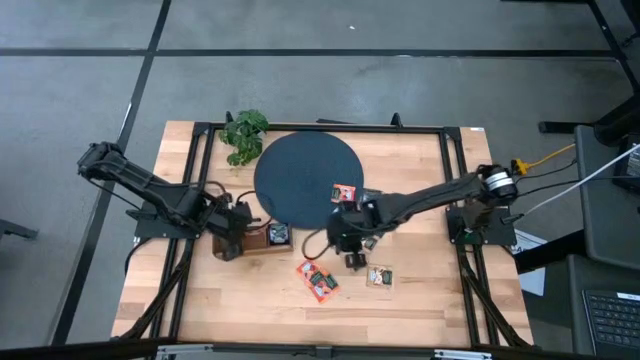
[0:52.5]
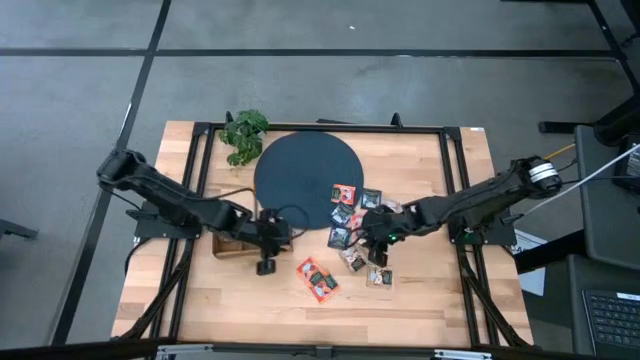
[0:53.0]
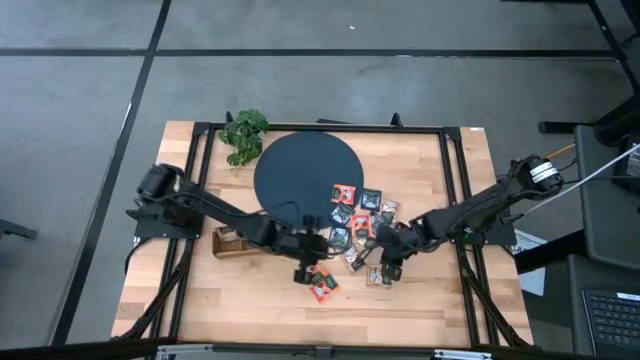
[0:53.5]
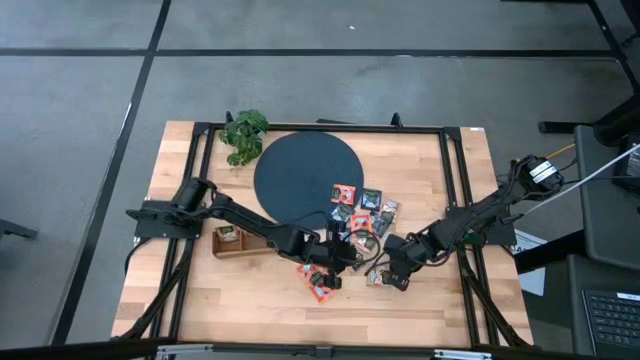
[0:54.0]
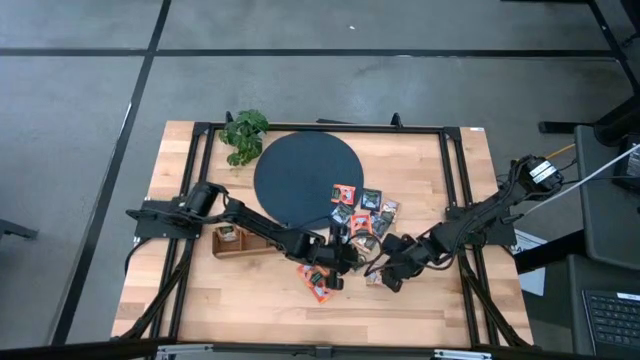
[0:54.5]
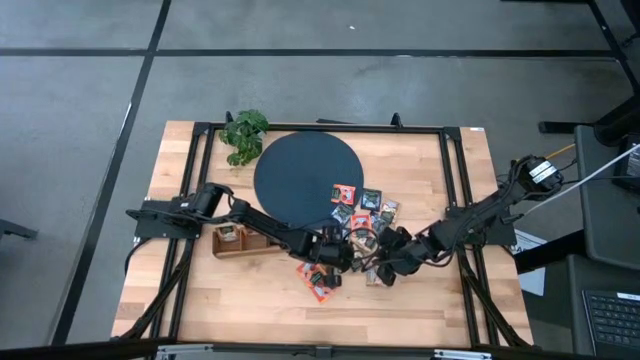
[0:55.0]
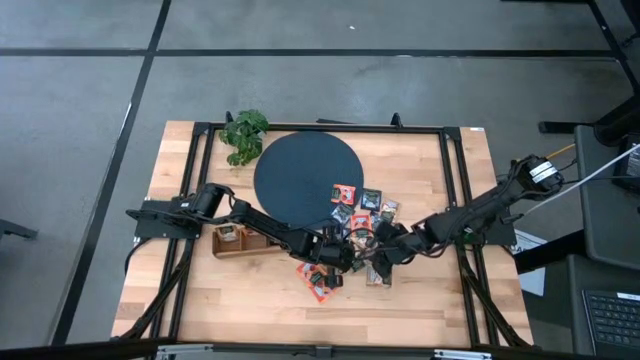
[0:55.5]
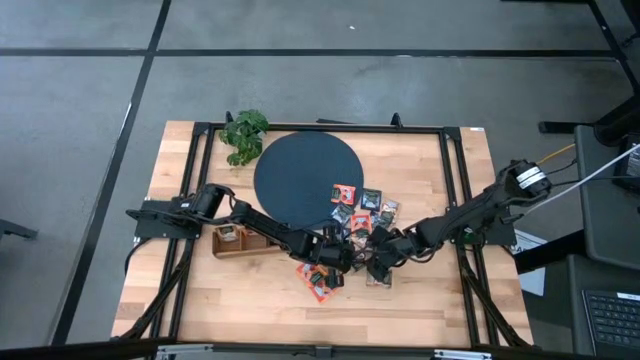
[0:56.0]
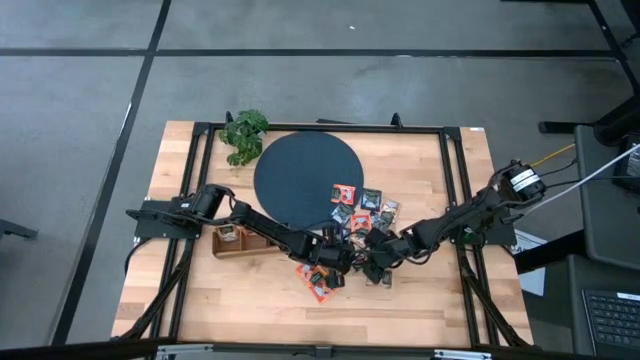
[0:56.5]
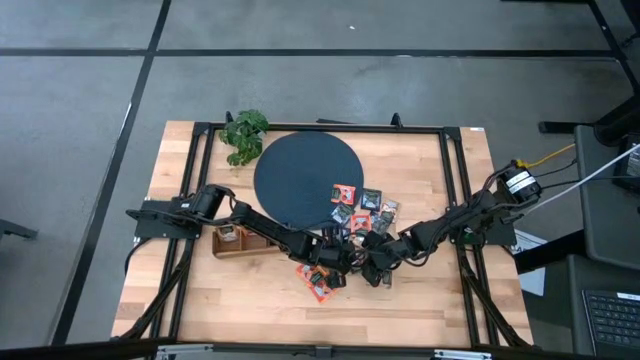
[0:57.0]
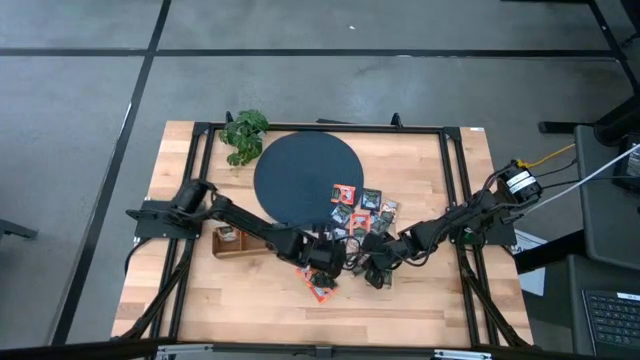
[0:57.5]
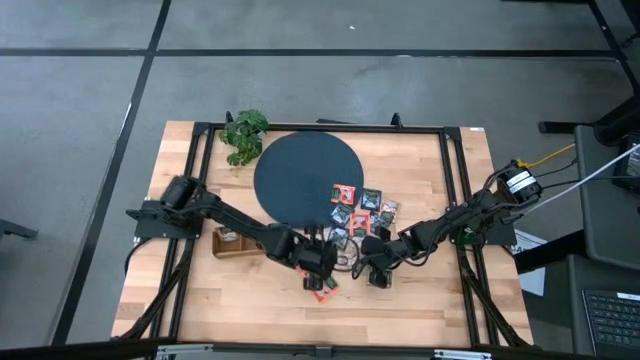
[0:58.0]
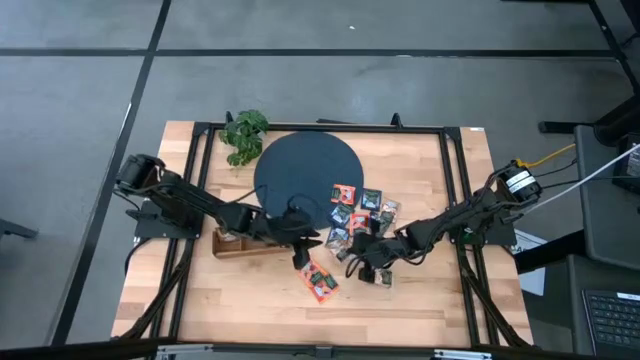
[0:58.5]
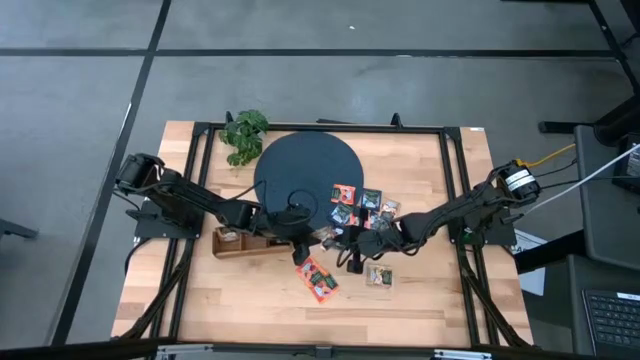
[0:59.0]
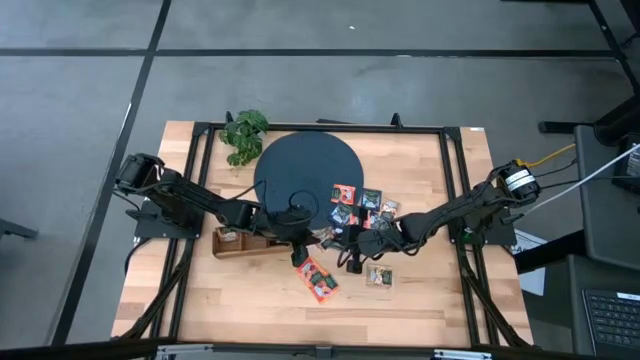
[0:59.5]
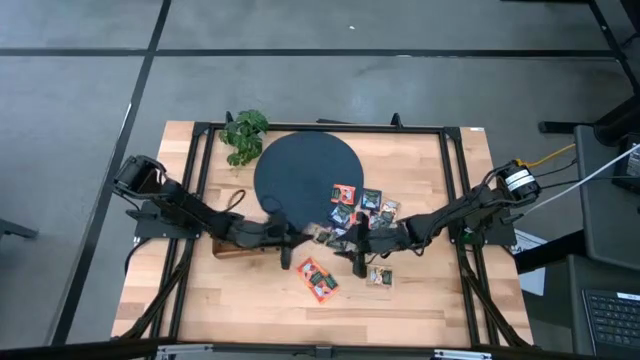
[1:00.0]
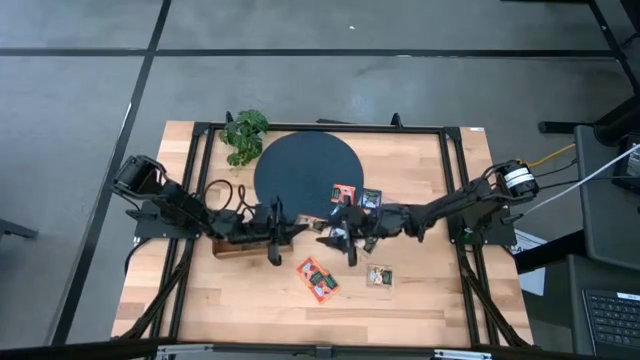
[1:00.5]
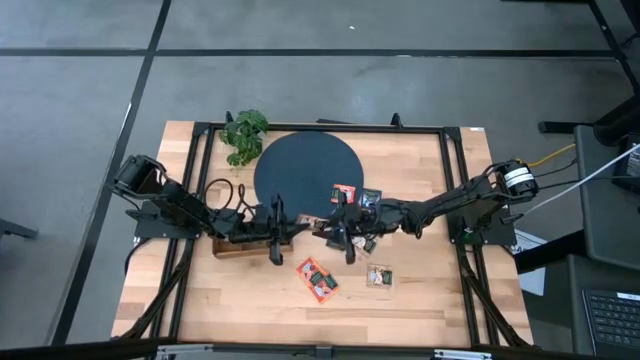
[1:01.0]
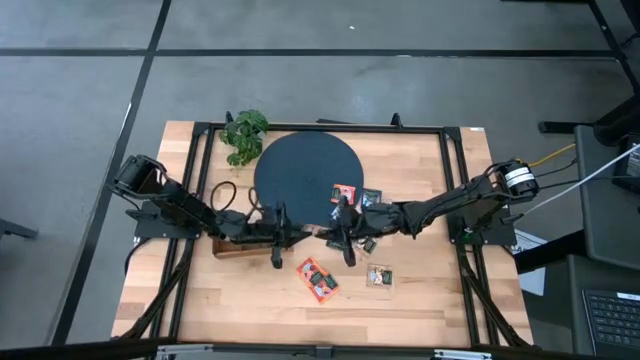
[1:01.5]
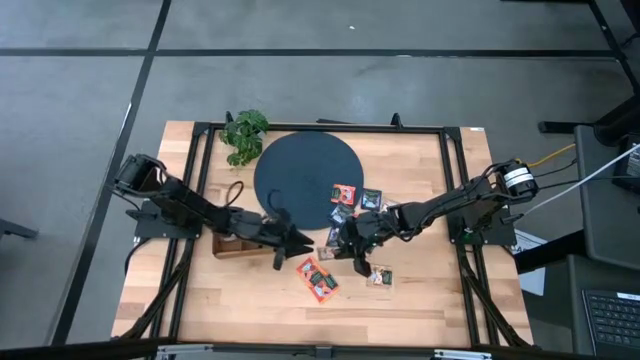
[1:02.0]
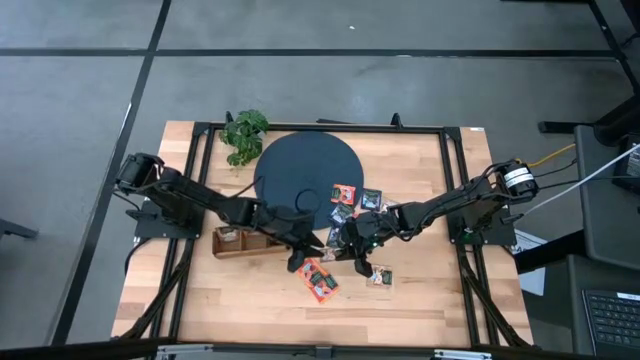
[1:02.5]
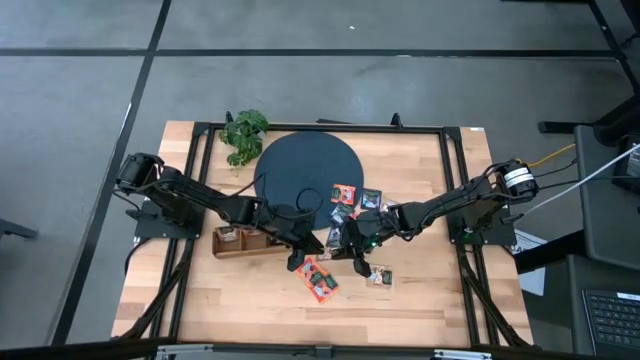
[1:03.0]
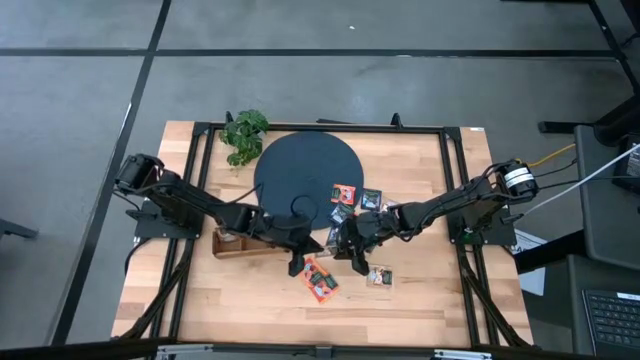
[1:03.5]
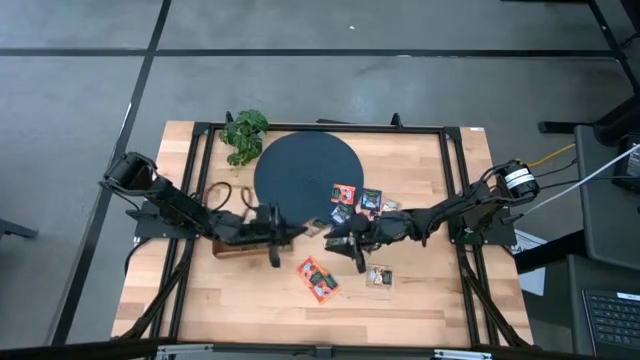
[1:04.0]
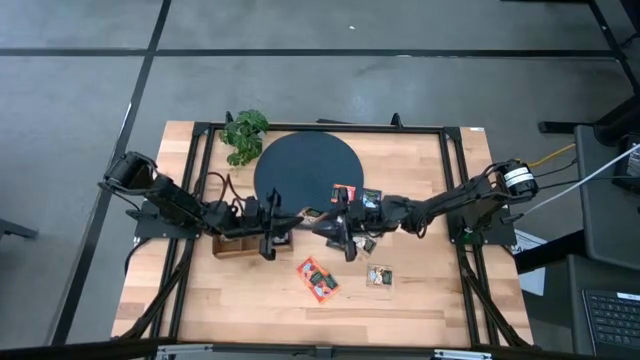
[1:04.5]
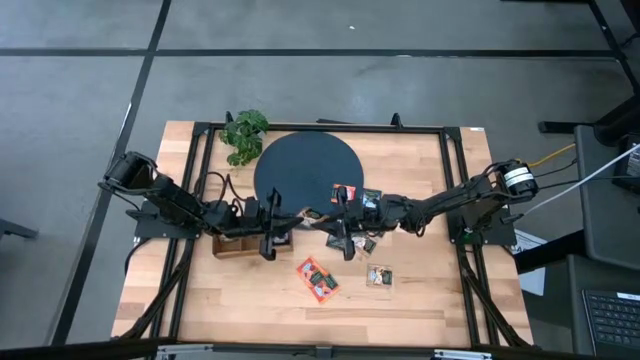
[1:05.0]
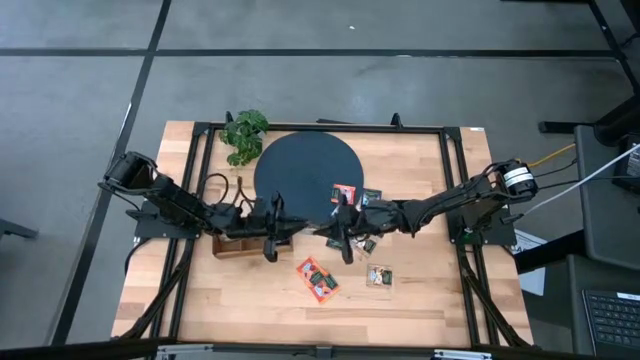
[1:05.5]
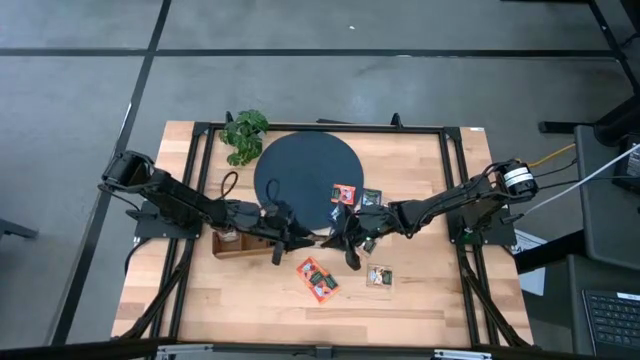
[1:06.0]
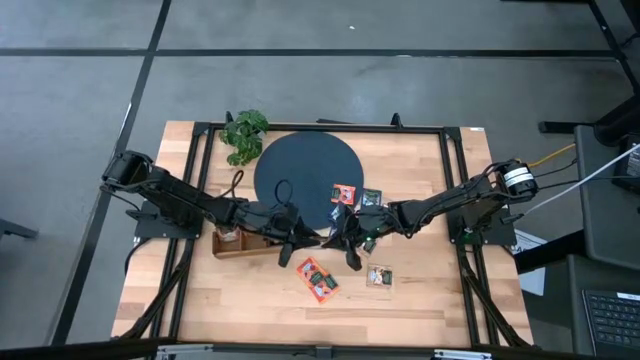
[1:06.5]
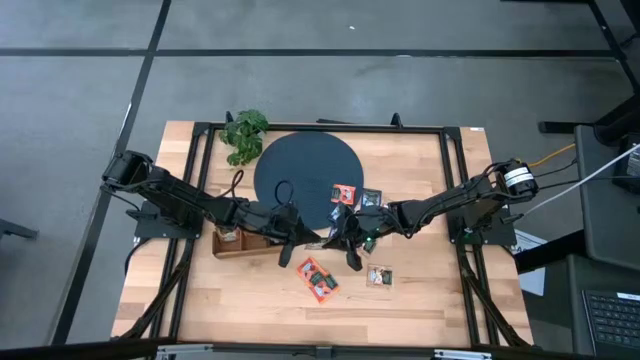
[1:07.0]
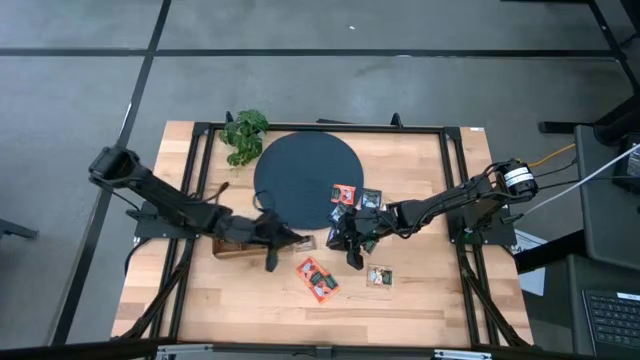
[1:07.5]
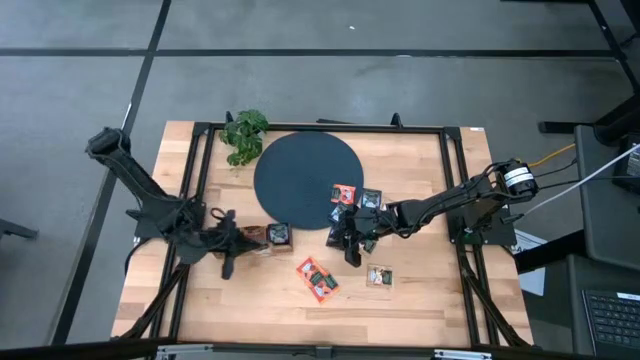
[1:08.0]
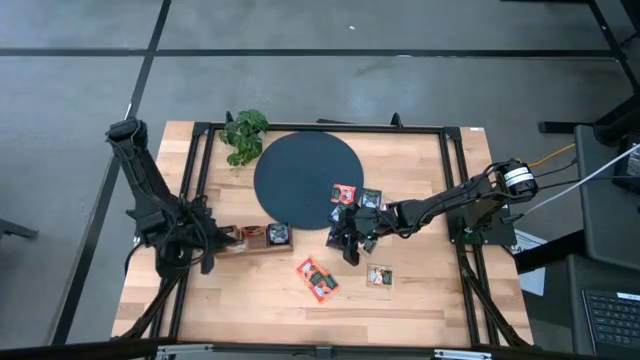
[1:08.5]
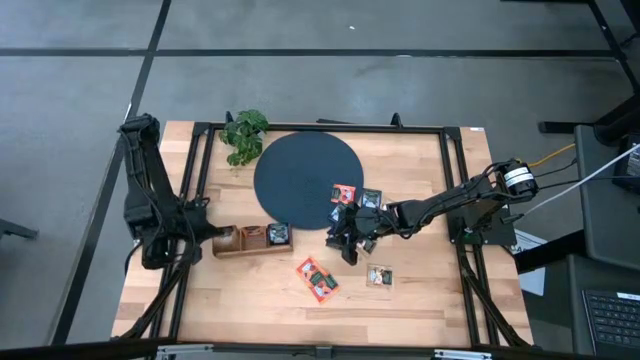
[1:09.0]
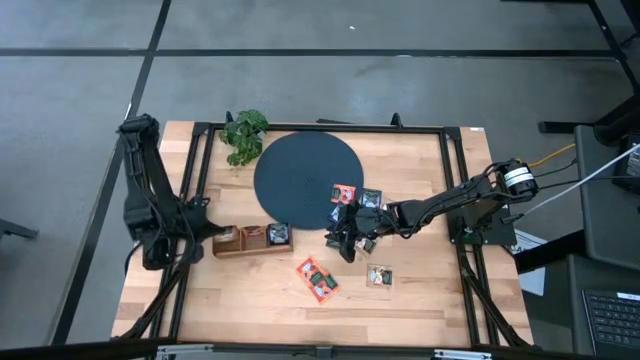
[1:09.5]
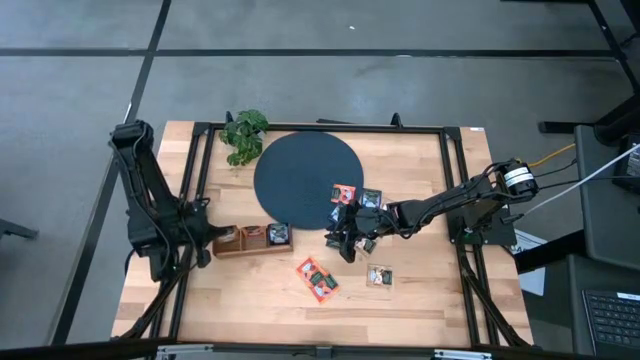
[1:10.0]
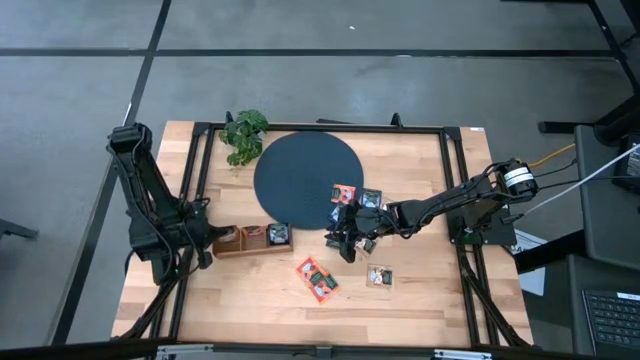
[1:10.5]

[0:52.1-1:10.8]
Task: Pick & Place Tea
Put the brown tea bag into the left section of the wooden organizer
